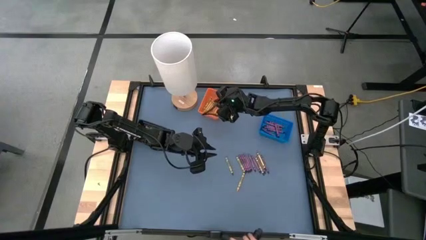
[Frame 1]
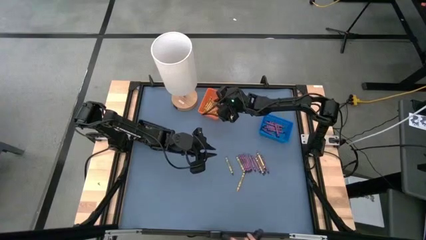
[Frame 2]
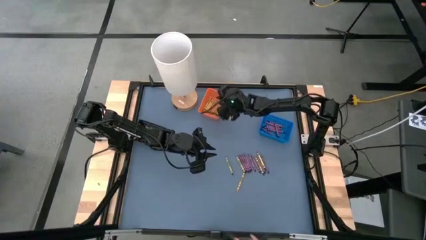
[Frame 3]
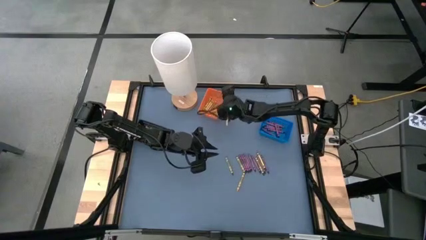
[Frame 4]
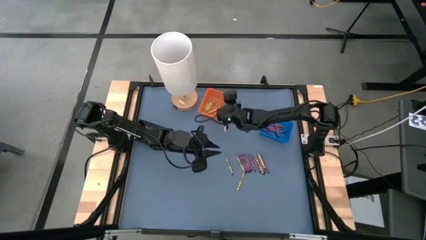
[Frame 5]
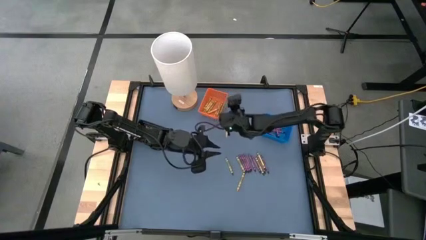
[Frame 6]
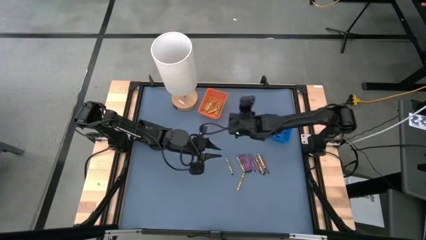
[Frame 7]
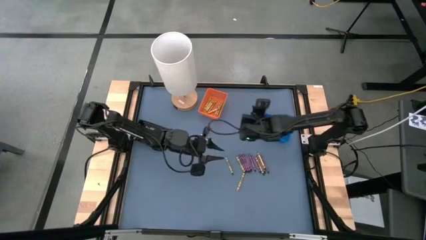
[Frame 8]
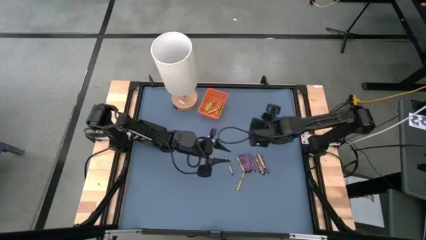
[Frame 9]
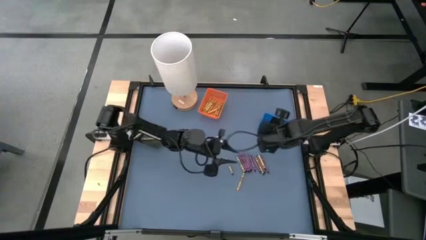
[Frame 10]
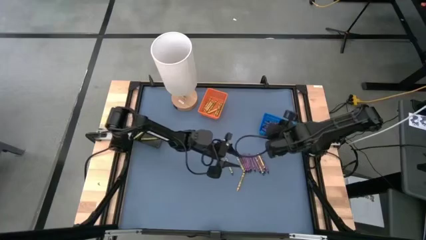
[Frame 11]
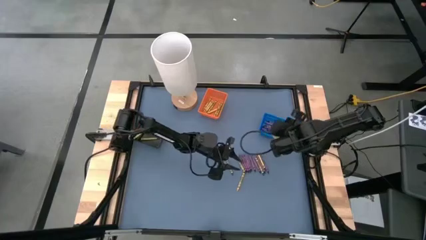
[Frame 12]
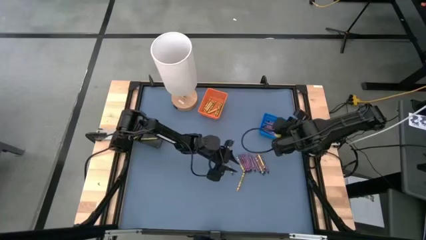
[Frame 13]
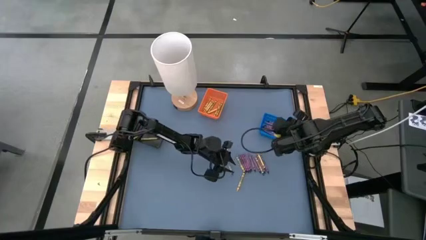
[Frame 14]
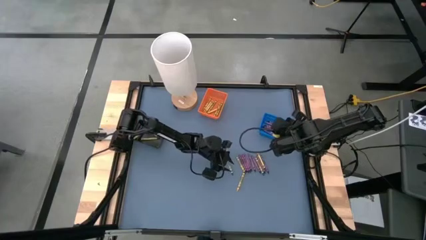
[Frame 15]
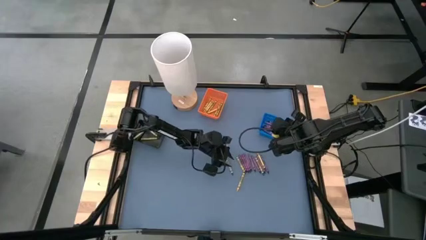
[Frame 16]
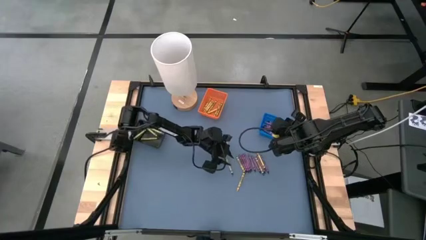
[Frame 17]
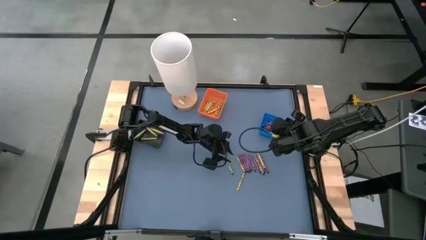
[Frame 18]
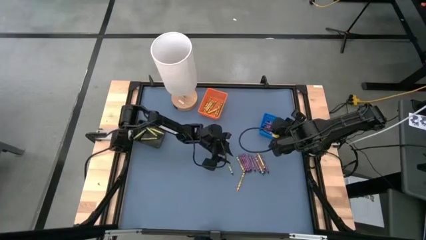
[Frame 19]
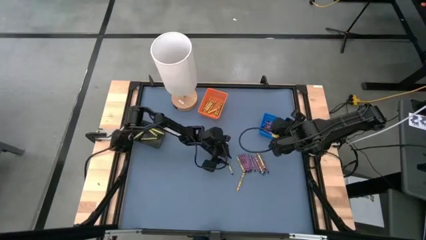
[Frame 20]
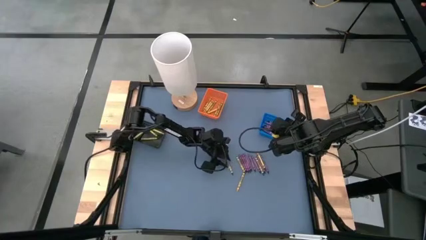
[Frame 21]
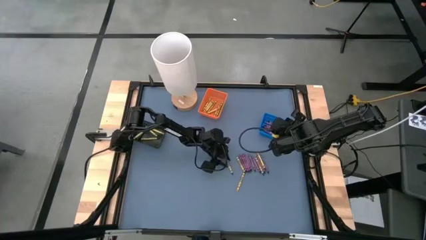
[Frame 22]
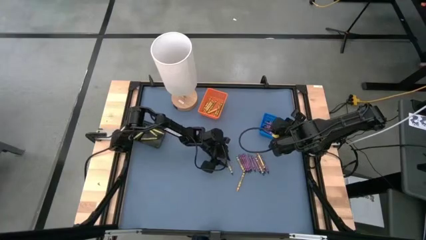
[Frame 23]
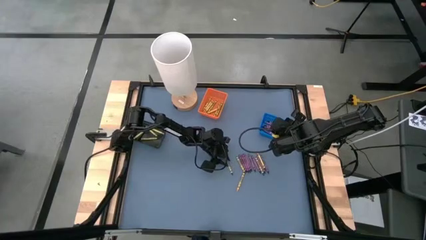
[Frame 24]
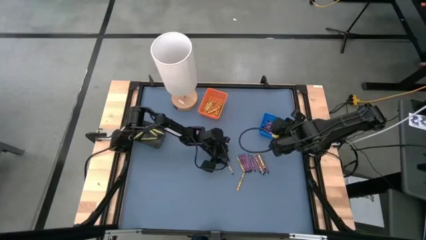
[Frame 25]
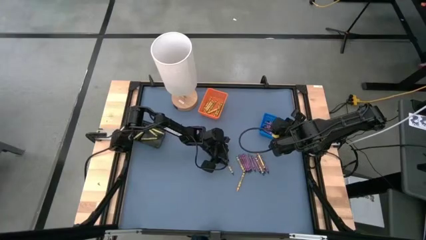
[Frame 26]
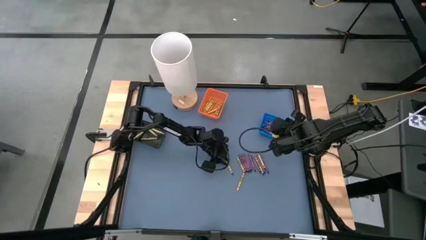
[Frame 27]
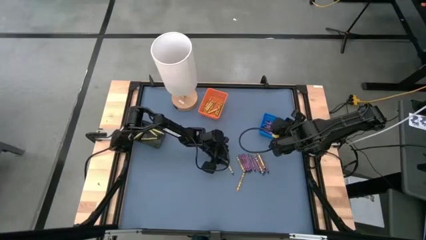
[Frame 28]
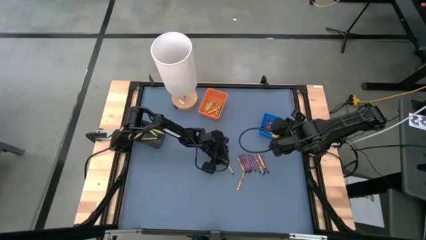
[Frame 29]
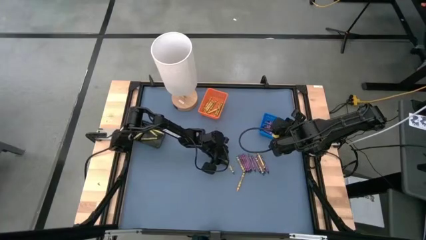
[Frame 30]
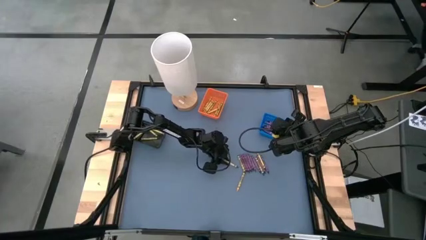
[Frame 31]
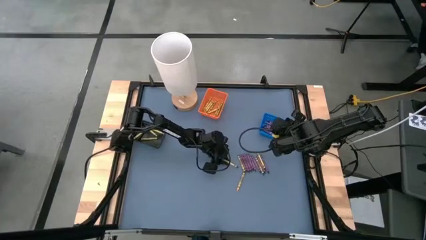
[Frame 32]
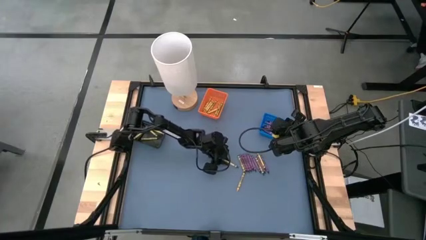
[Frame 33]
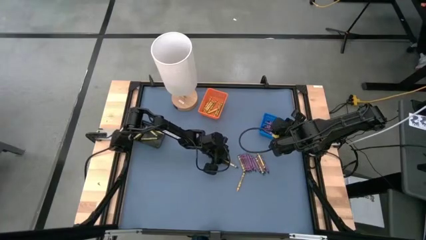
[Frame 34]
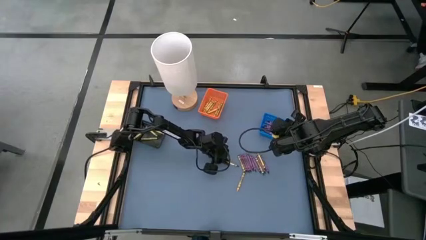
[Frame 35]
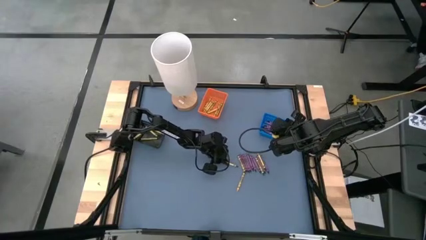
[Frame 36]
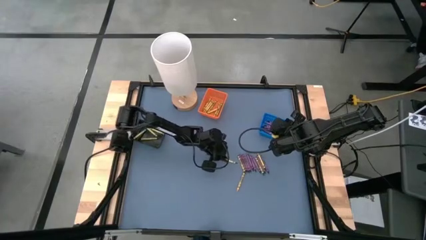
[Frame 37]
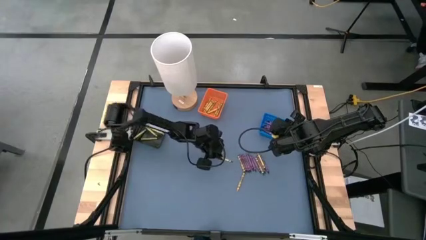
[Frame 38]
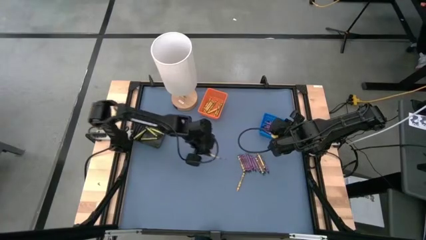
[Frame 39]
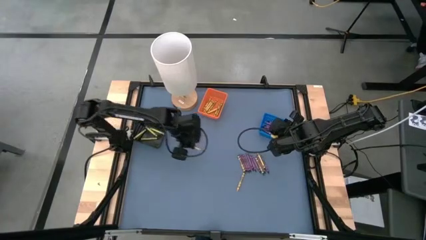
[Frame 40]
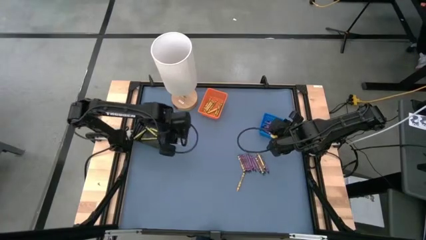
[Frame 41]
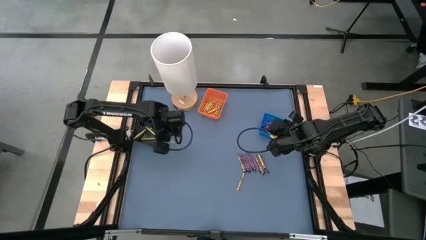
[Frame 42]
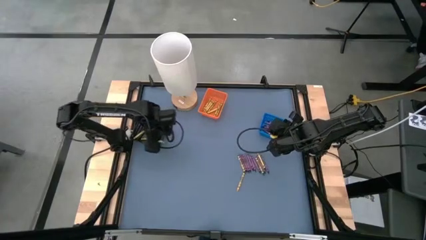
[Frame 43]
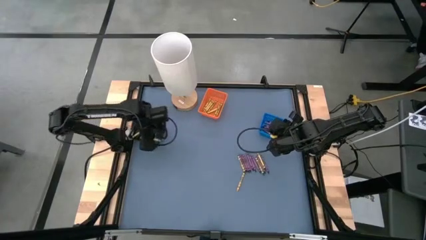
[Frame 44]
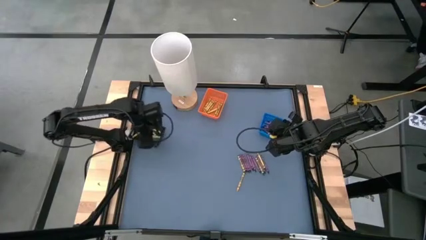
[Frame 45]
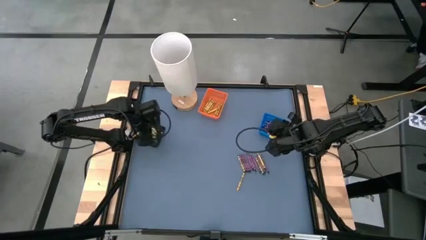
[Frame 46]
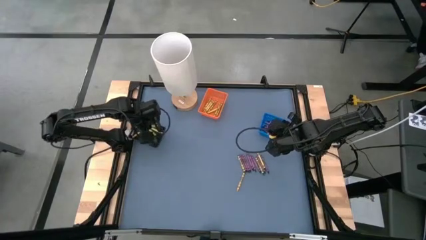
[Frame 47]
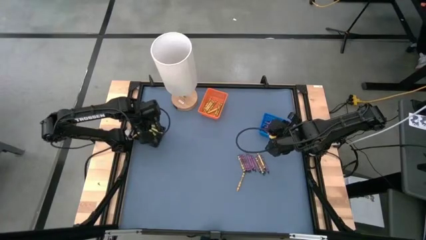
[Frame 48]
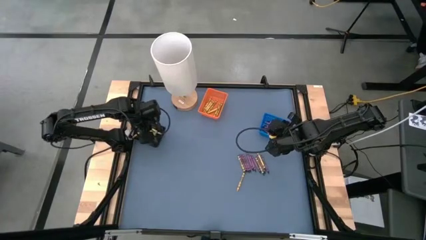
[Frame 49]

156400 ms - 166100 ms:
Task: Sort crayons
Put the green crayon into the black basket

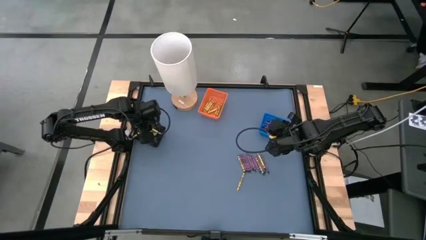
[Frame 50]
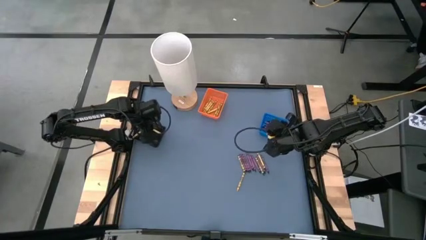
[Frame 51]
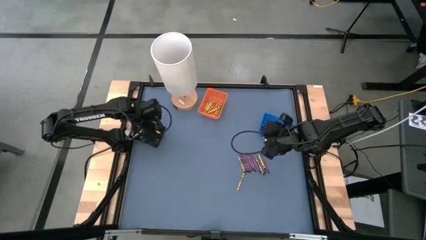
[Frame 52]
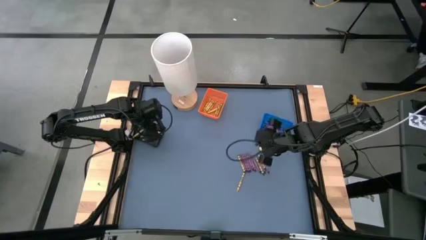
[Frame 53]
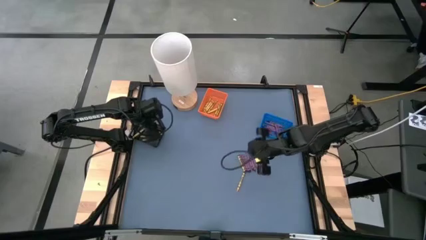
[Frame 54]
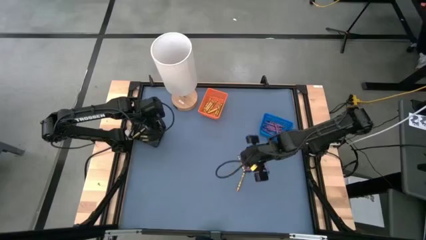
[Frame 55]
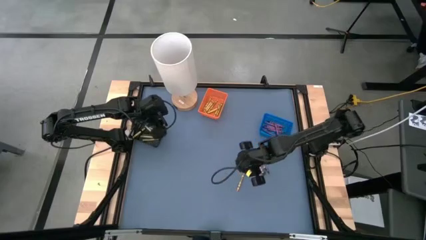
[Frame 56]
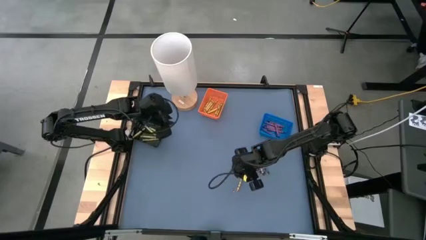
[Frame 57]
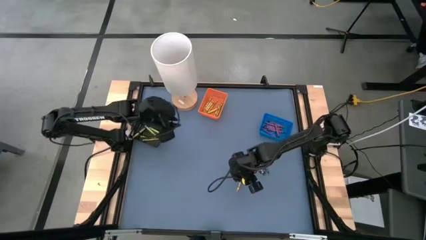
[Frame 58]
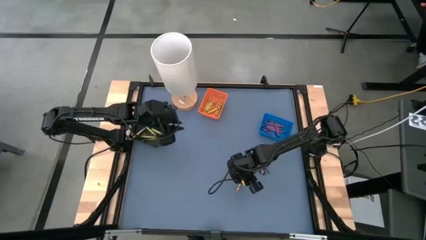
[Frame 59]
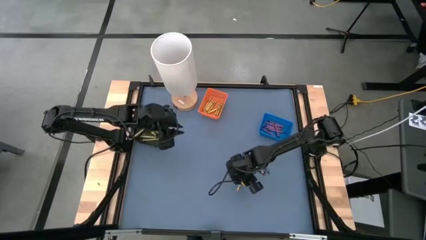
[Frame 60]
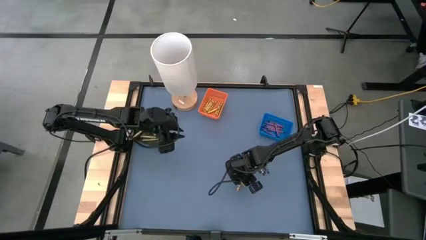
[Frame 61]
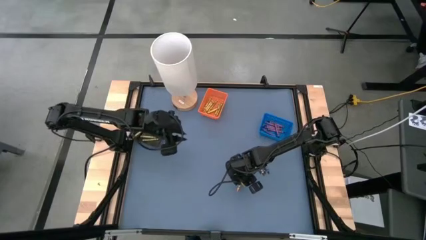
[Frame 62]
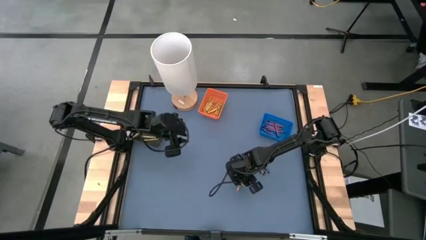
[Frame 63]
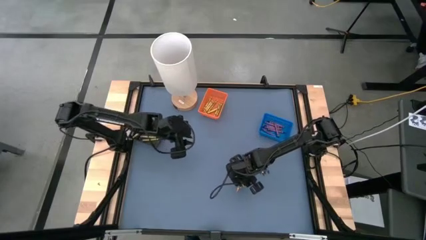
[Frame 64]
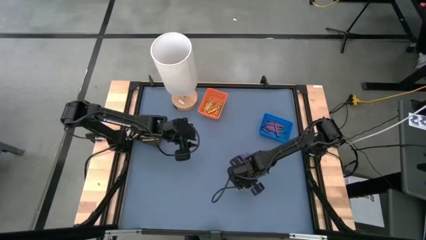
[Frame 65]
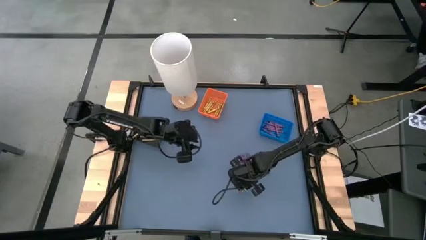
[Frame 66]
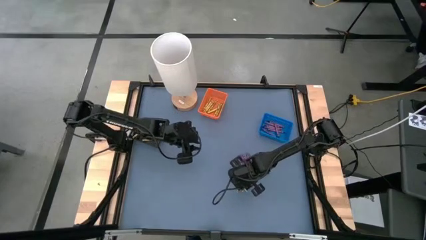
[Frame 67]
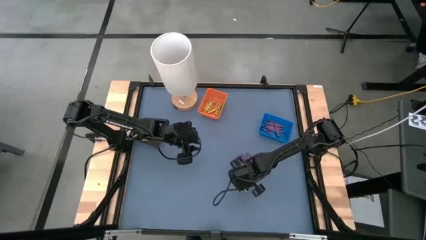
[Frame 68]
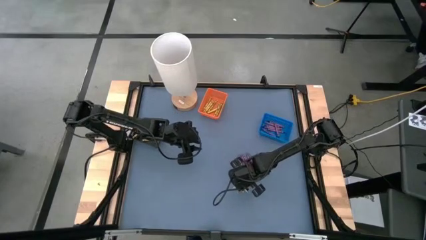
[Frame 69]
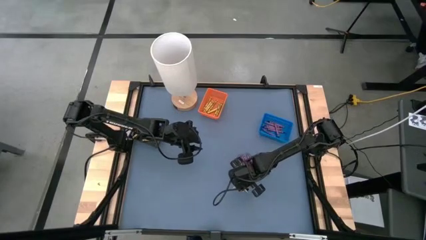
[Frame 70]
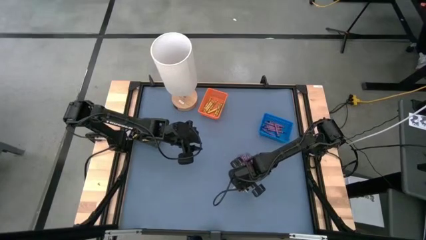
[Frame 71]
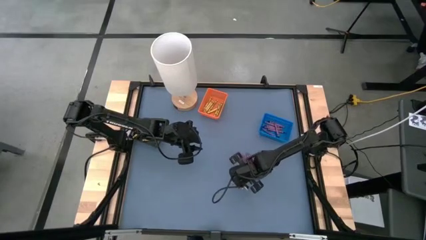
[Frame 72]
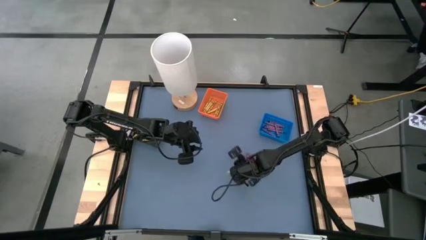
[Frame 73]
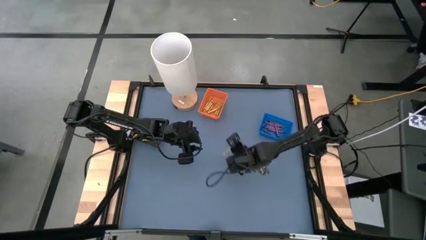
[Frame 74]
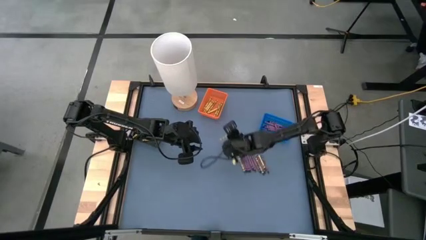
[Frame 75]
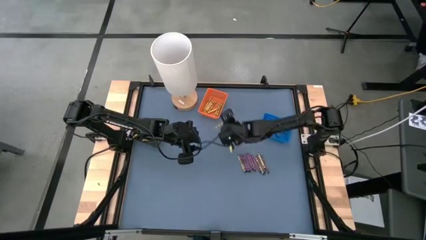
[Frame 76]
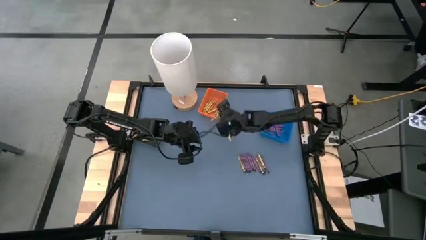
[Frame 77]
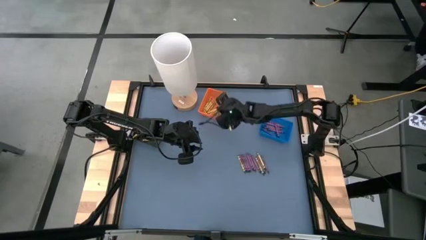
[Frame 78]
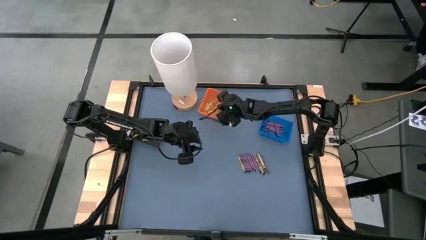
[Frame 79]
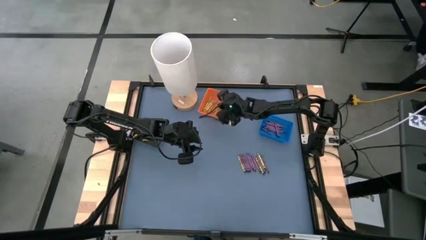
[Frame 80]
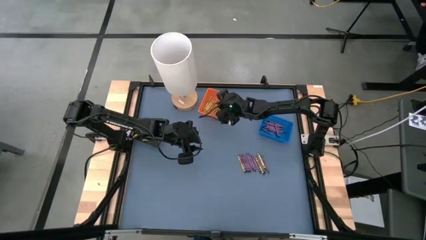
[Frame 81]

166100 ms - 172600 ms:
Put the yellow crayon into the orange basket
